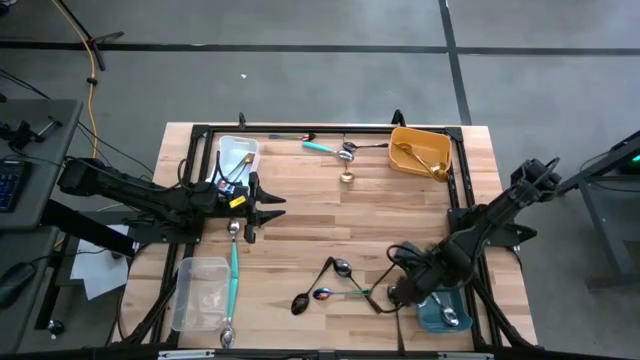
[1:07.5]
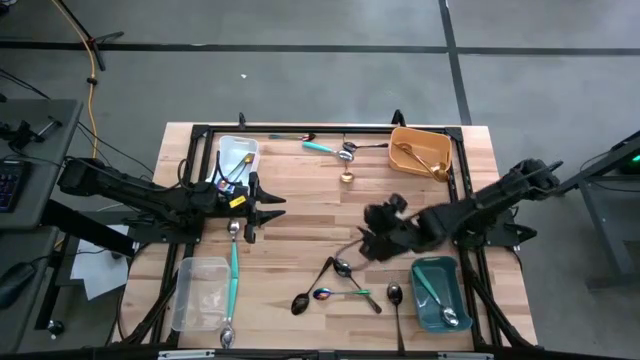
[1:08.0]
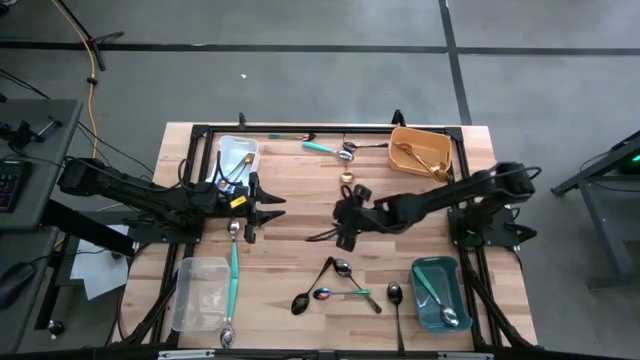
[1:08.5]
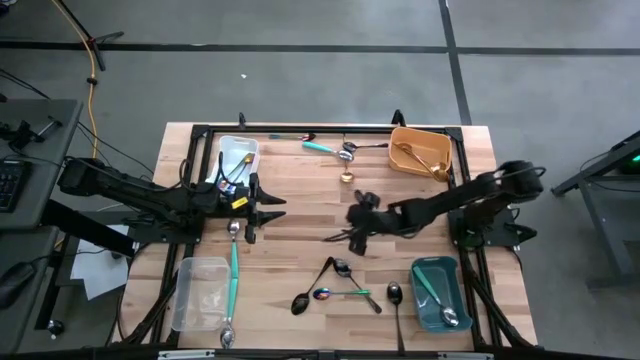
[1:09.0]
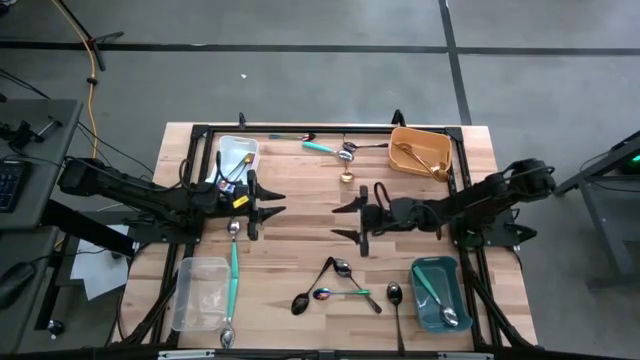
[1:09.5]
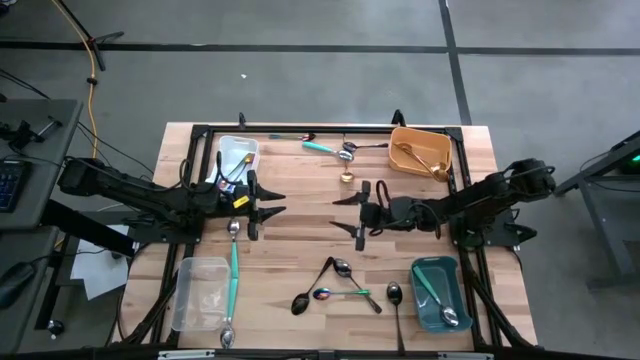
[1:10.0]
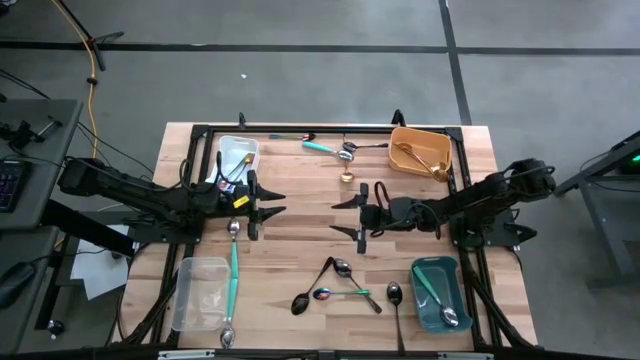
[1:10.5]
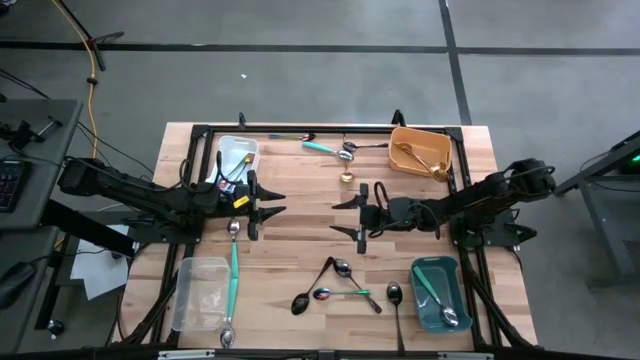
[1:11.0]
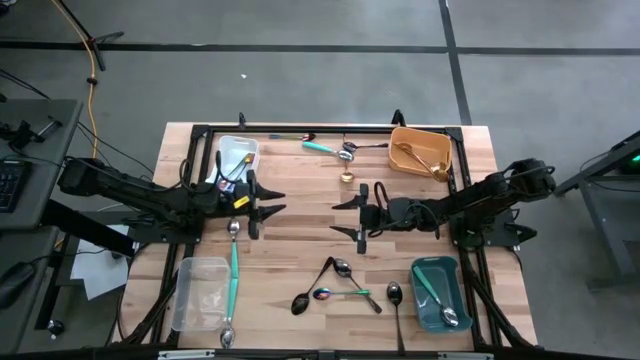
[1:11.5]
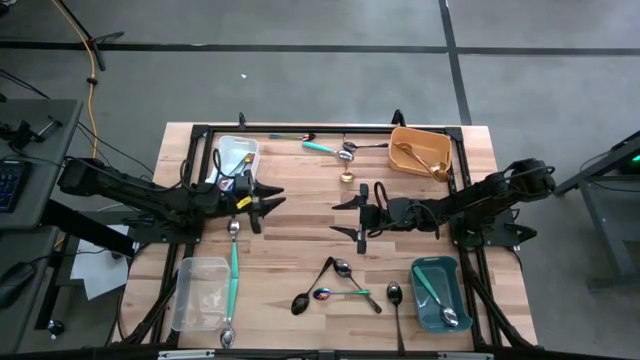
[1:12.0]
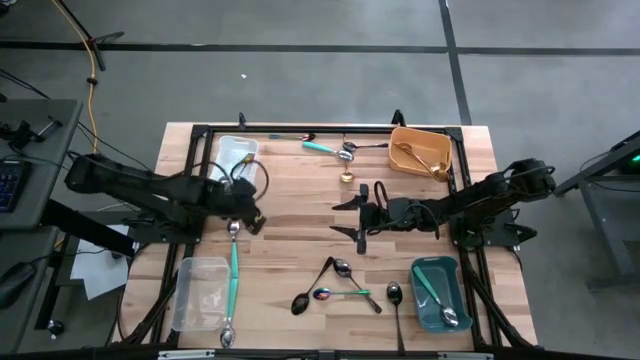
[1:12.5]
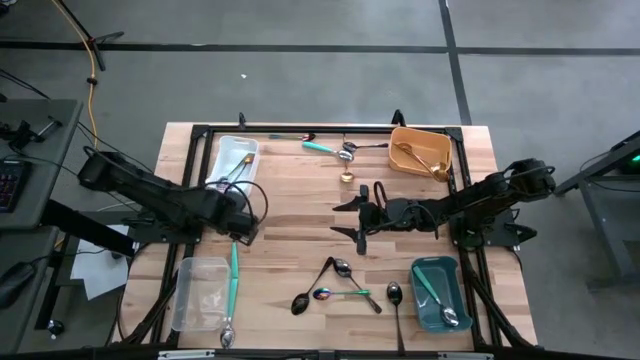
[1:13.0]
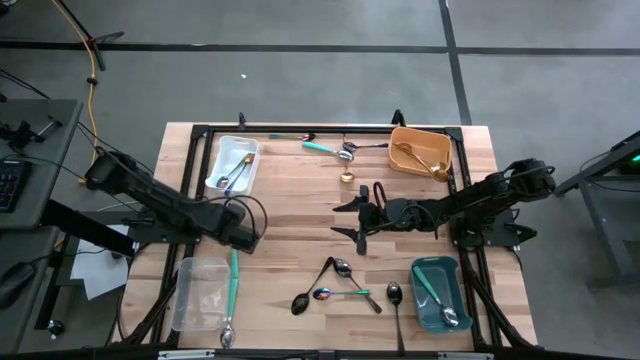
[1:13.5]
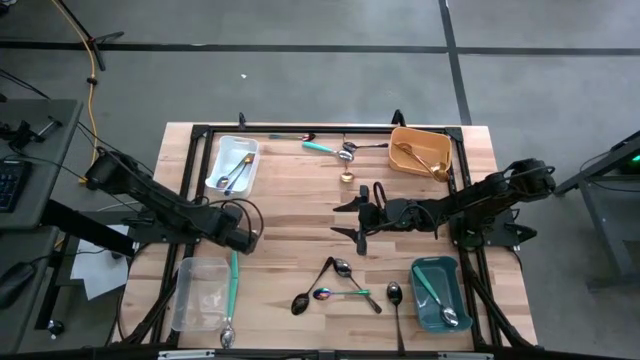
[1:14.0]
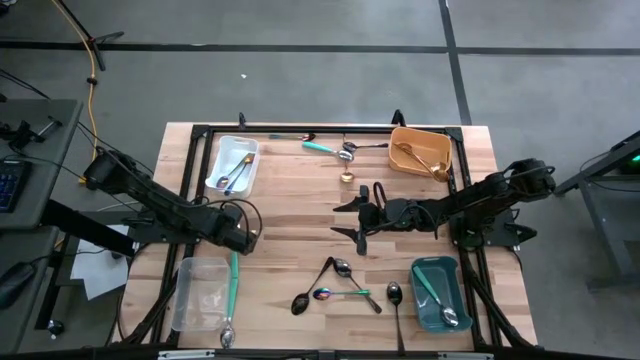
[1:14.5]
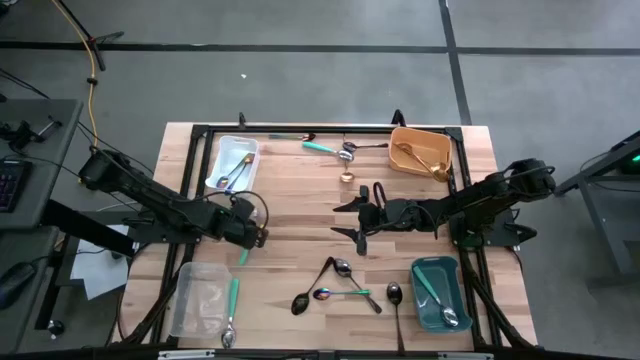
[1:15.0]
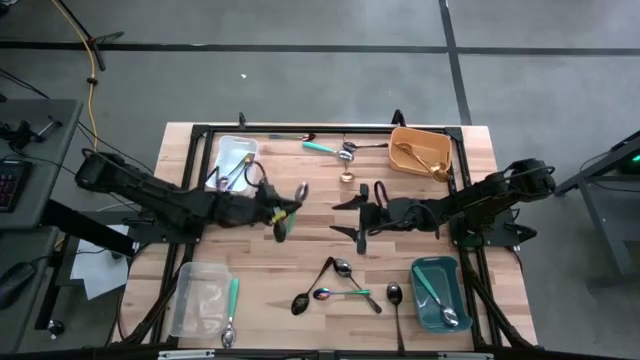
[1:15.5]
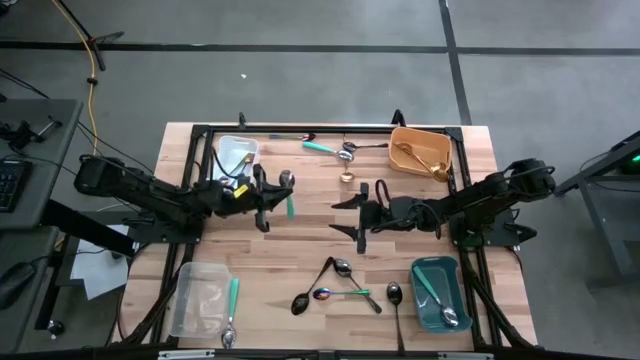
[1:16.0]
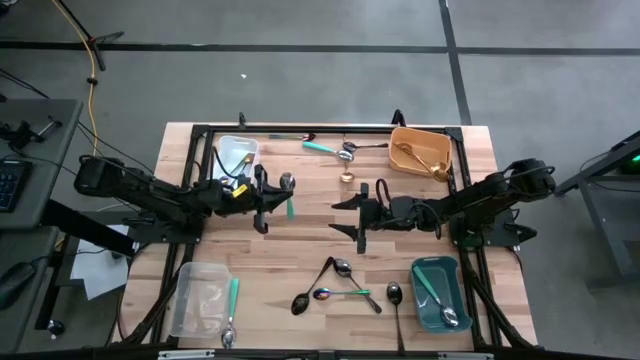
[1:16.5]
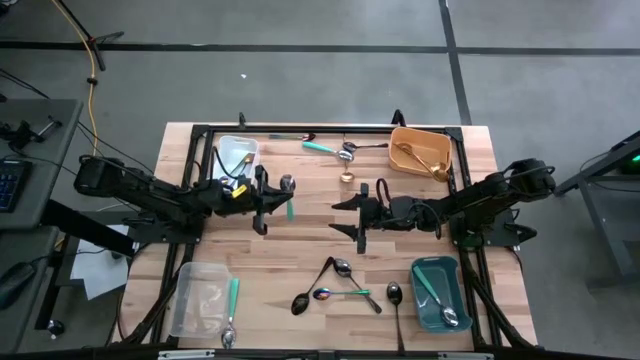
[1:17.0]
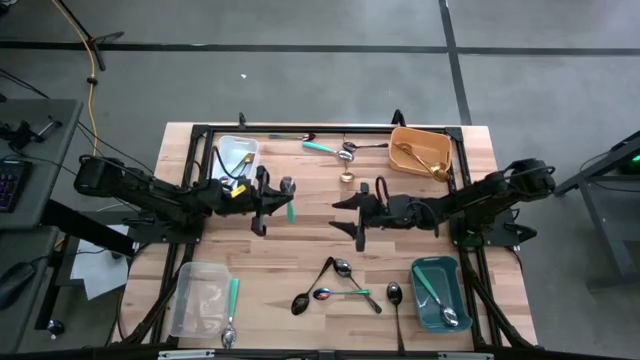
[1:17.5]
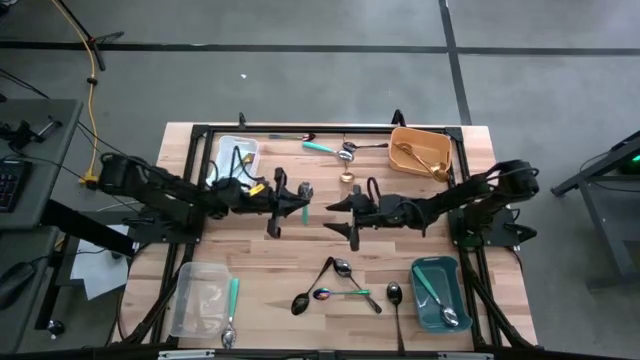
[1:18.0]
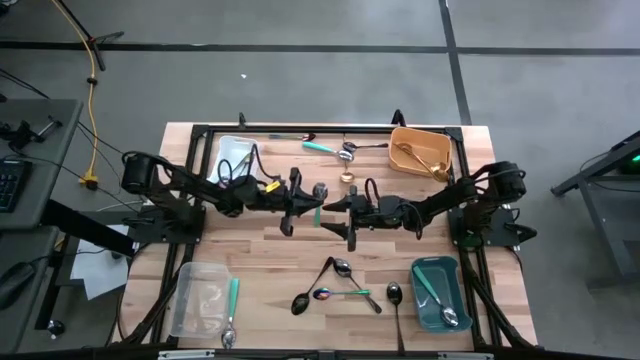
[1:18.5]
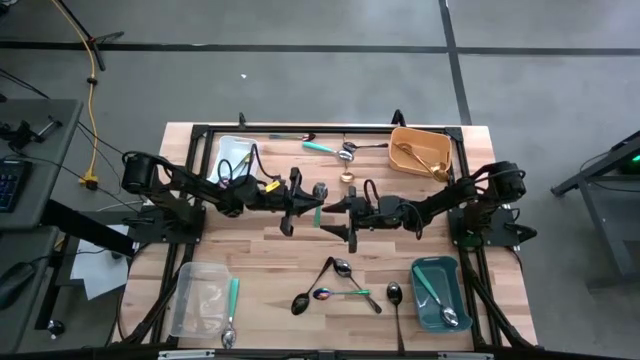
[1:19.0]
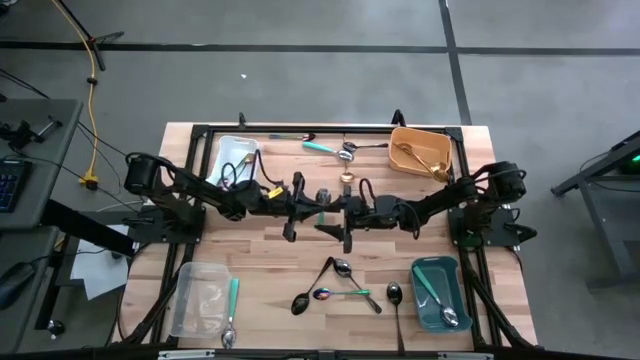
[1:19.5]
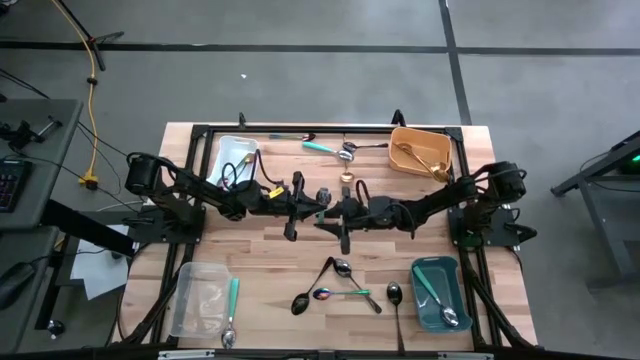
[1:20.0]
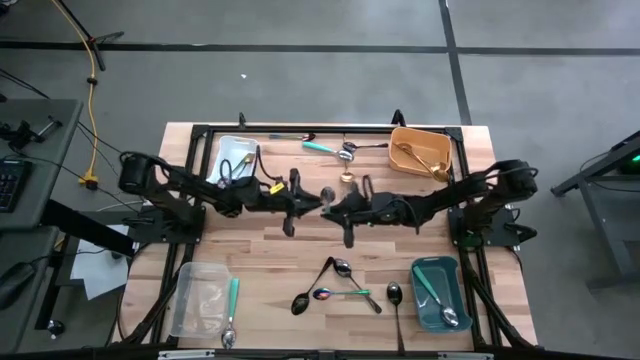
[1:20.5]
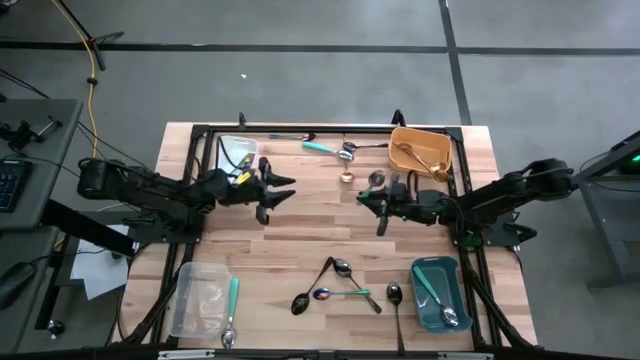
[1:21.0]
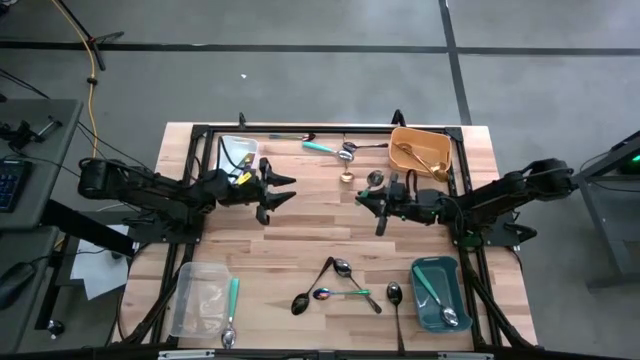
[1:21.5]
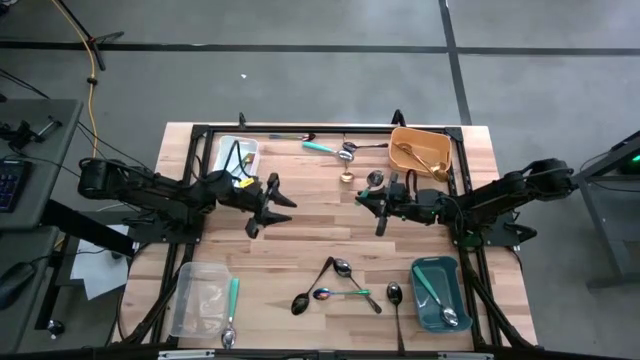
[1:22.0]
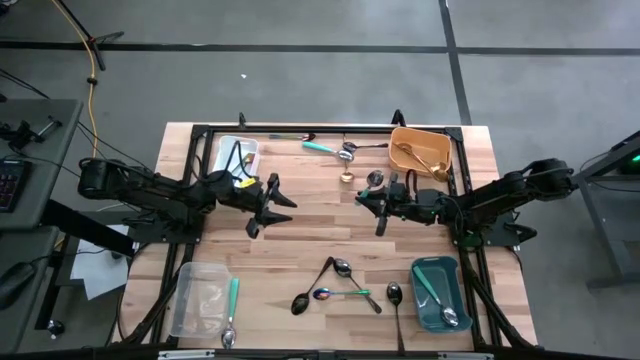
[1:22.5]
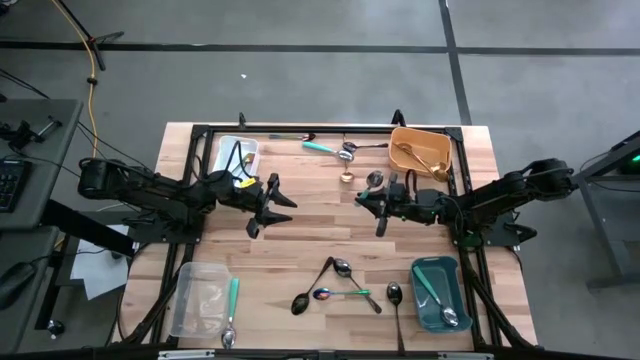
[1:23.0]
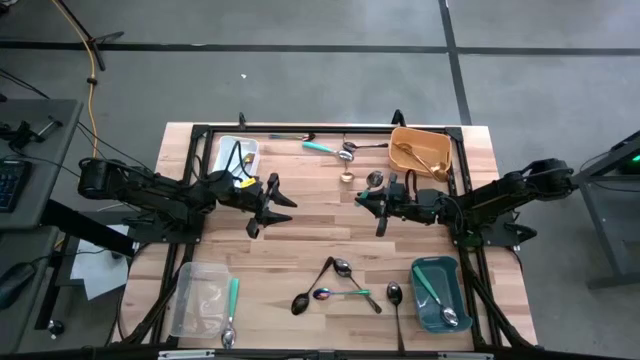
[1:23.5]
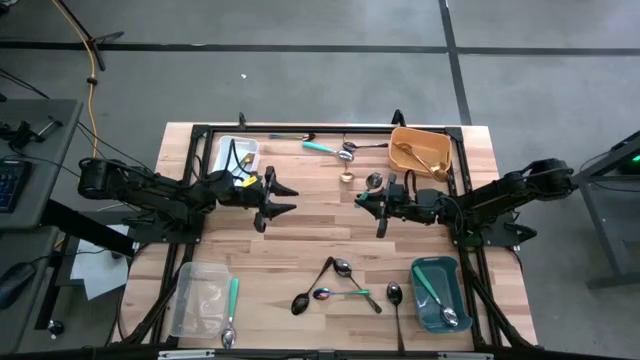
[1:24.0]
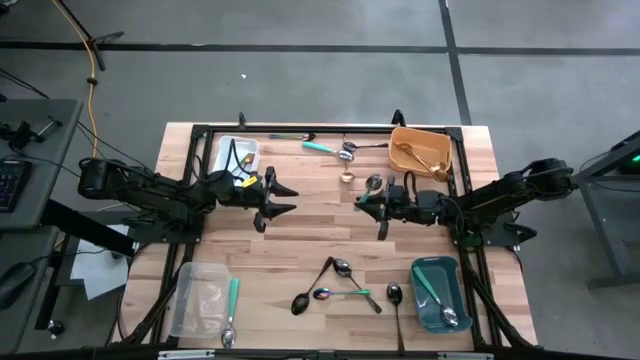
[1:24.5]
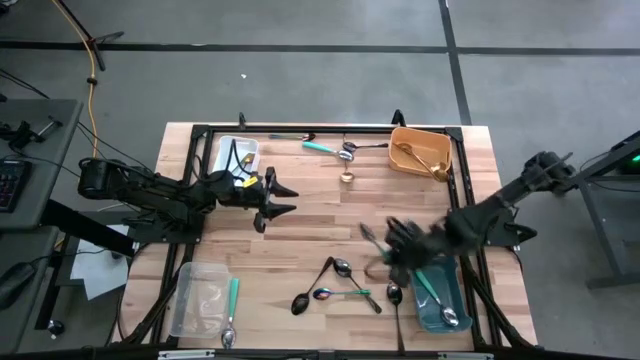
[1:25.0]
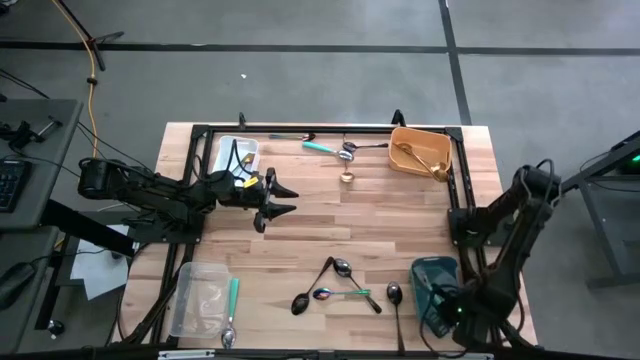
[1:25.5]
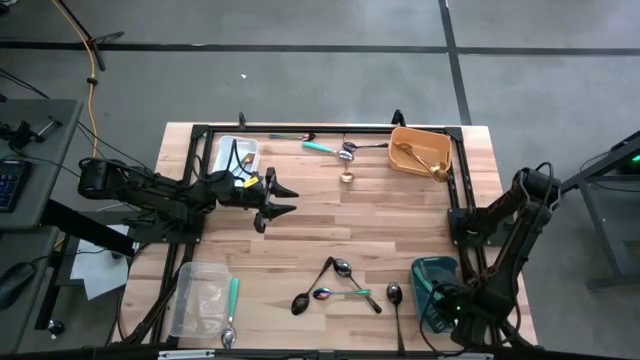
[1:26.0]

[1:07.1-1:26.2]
Task: Sort silverware by color (type)
Put the green spoon into the blue bin
